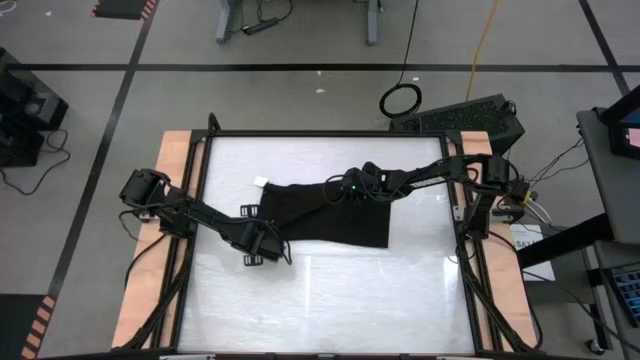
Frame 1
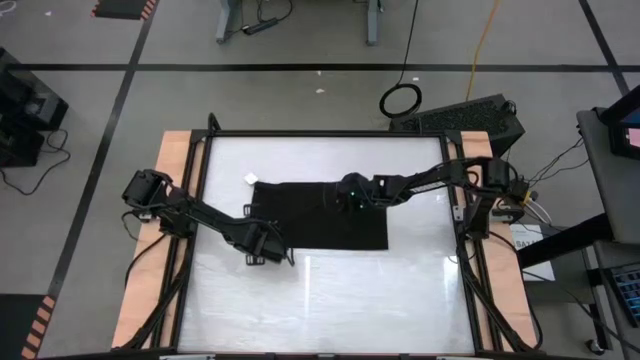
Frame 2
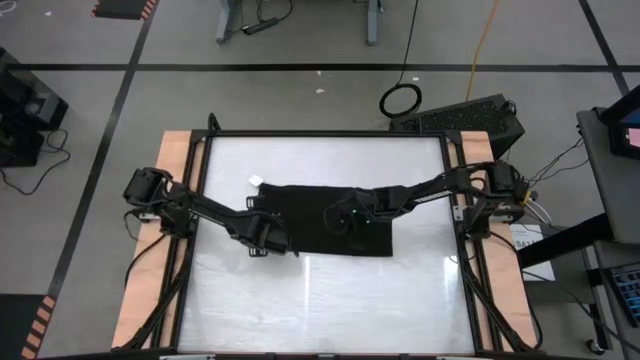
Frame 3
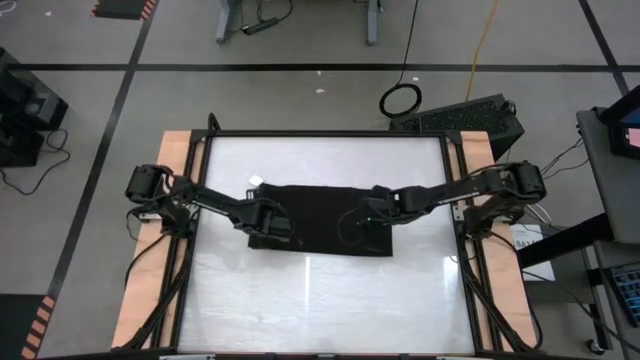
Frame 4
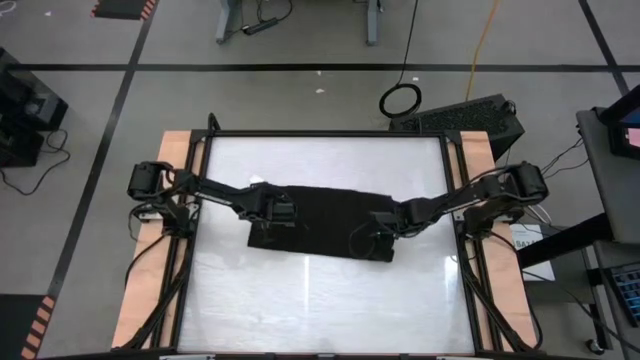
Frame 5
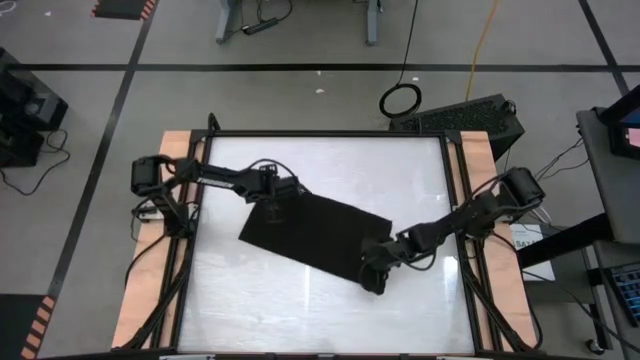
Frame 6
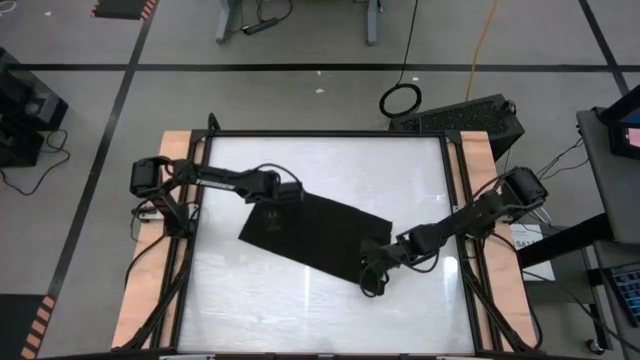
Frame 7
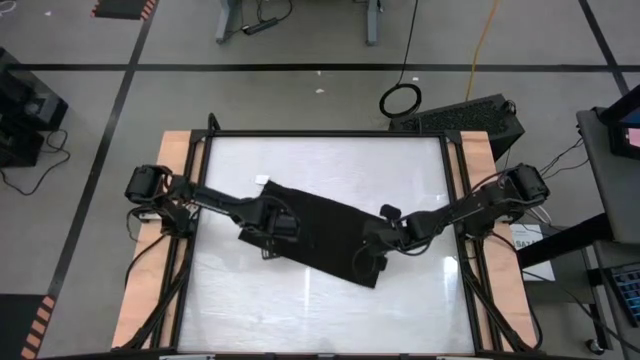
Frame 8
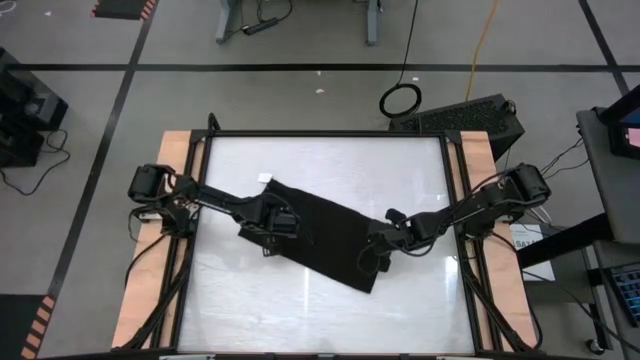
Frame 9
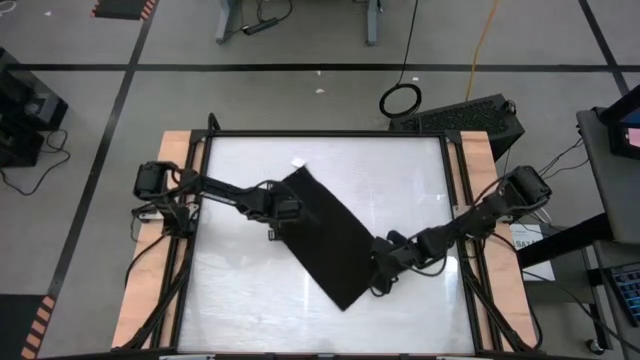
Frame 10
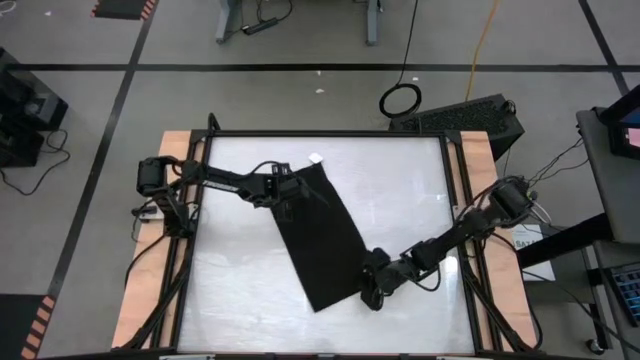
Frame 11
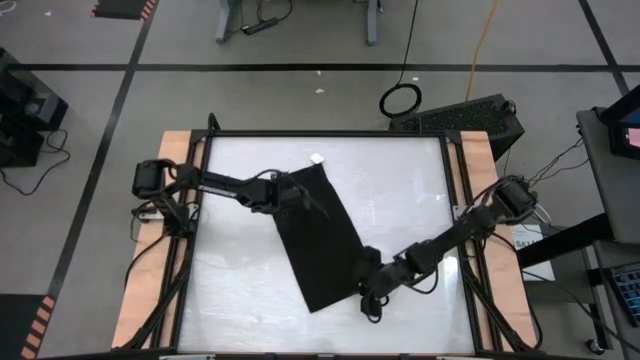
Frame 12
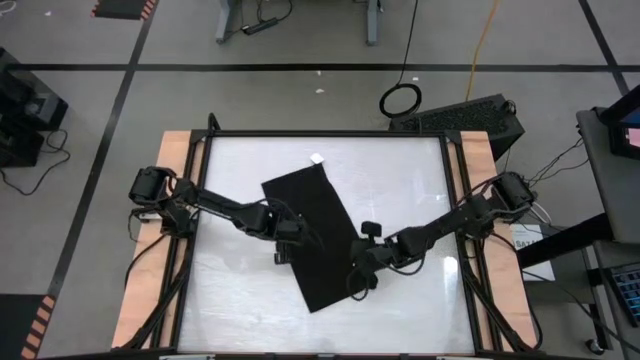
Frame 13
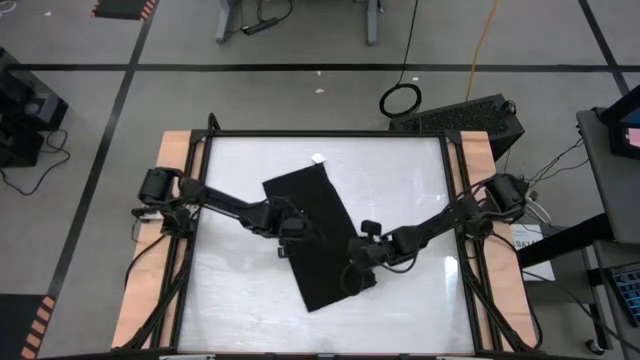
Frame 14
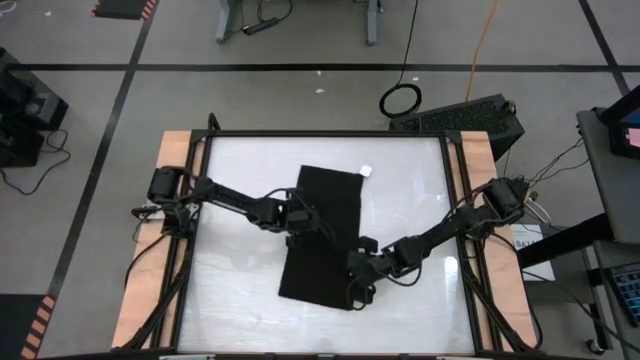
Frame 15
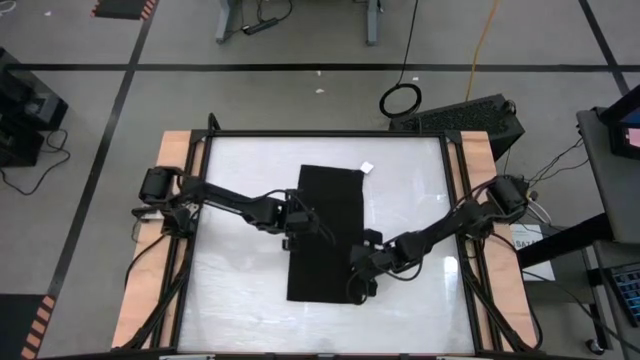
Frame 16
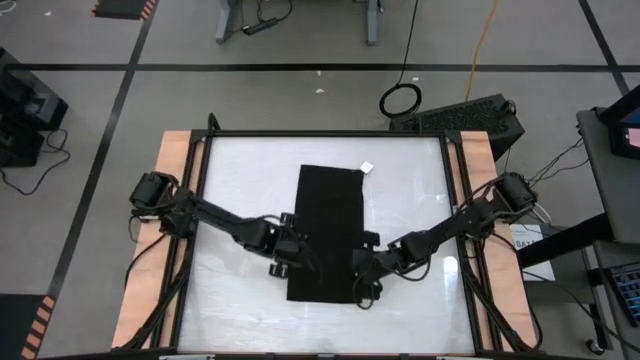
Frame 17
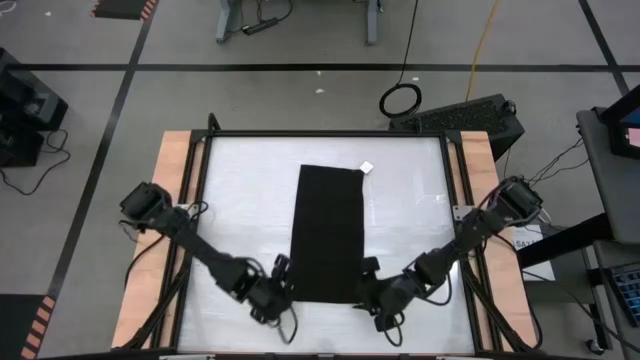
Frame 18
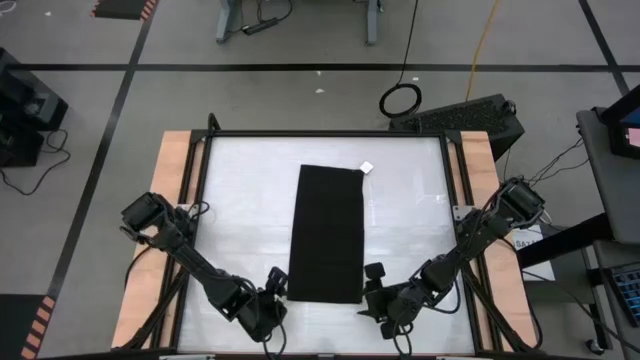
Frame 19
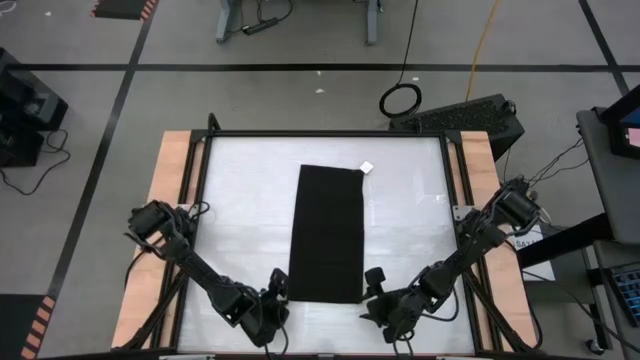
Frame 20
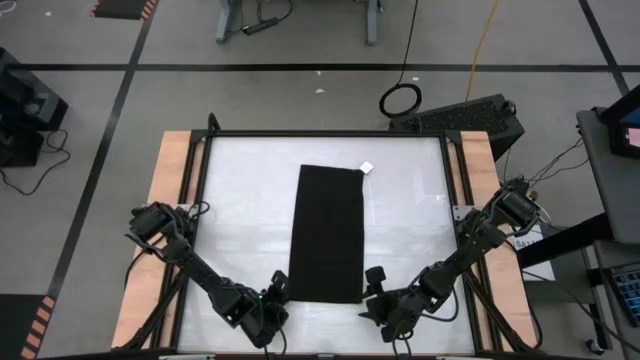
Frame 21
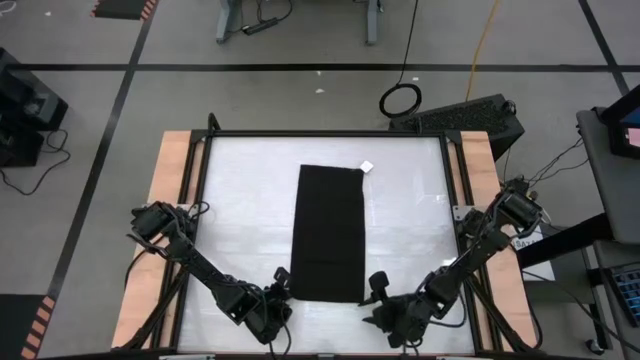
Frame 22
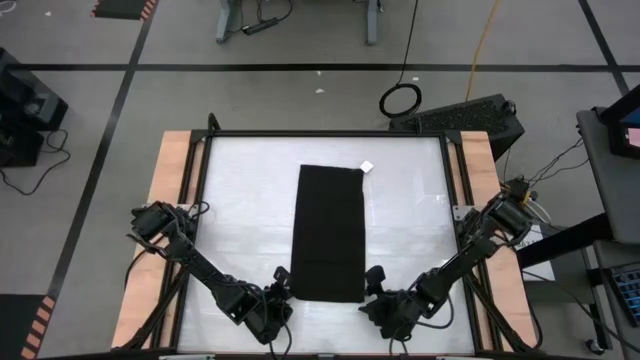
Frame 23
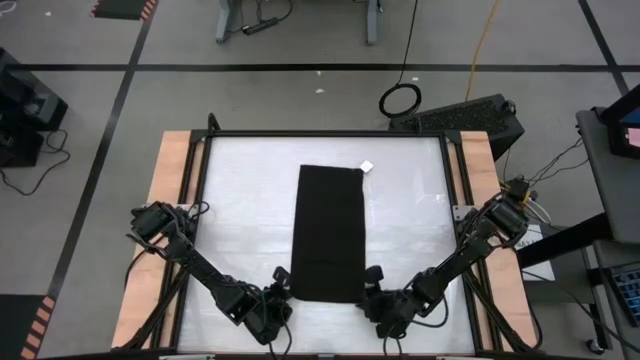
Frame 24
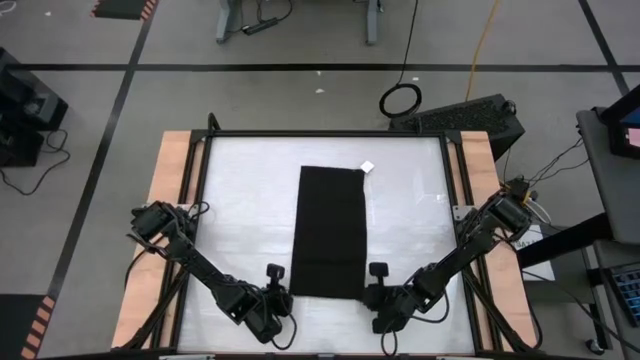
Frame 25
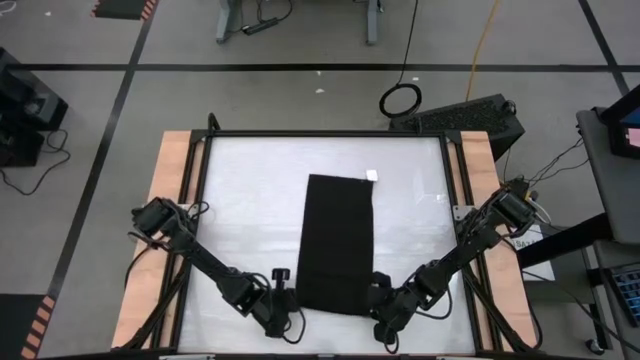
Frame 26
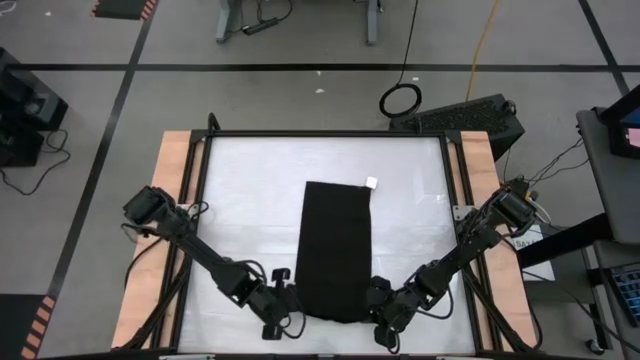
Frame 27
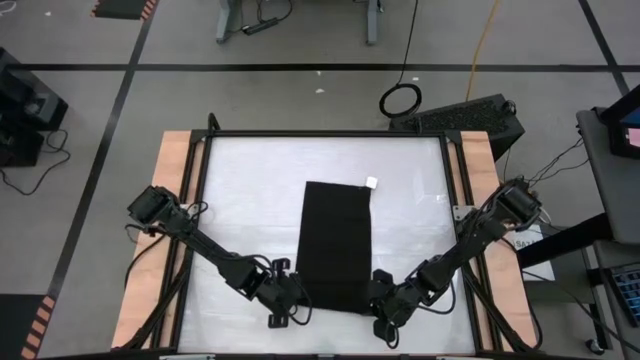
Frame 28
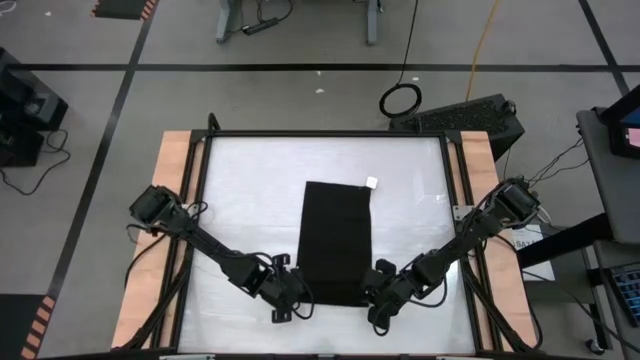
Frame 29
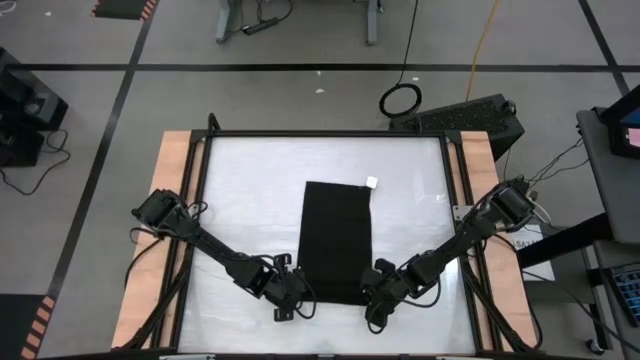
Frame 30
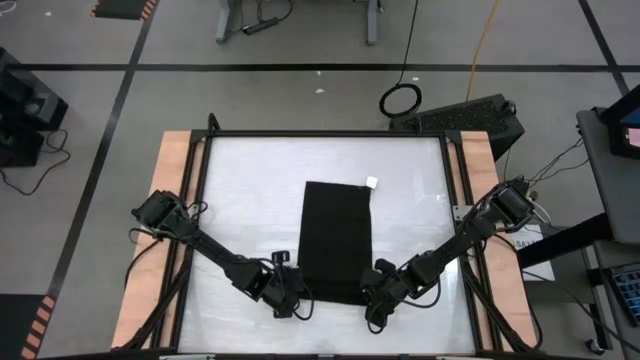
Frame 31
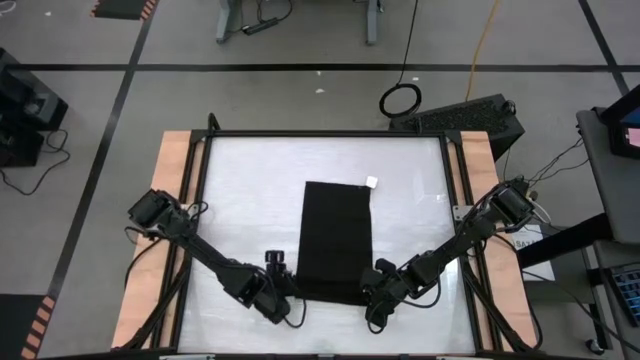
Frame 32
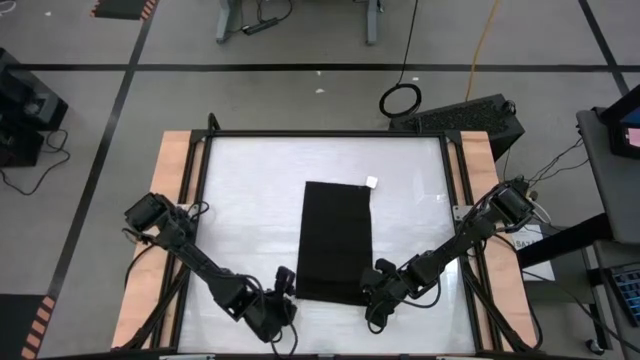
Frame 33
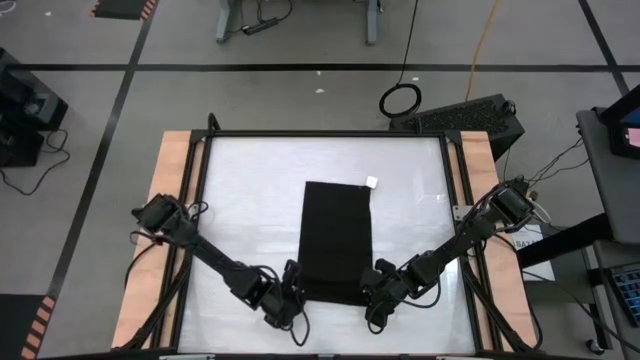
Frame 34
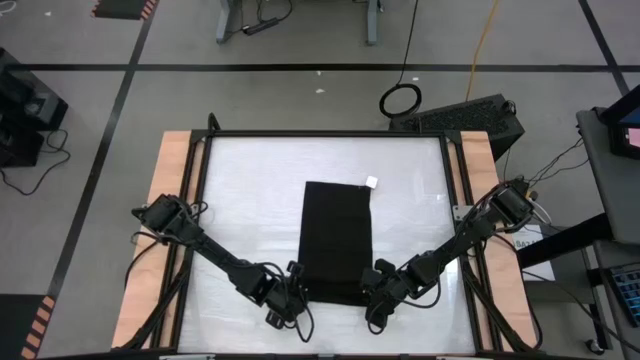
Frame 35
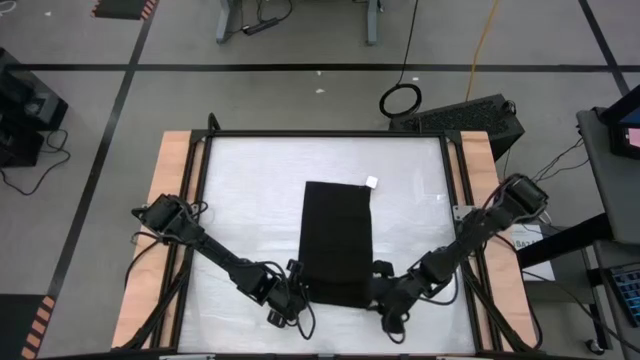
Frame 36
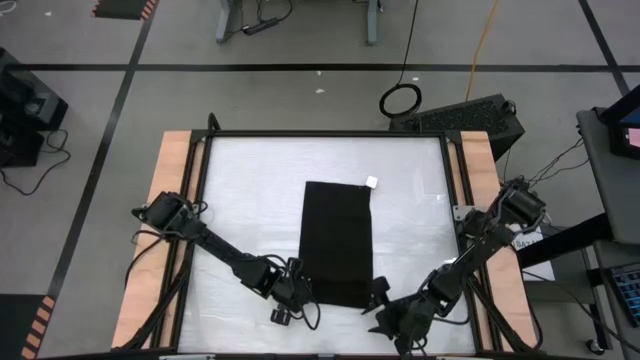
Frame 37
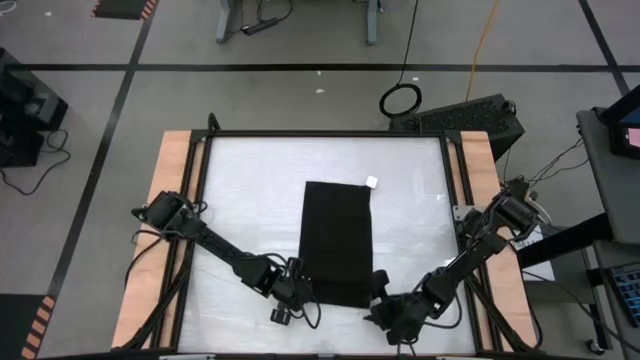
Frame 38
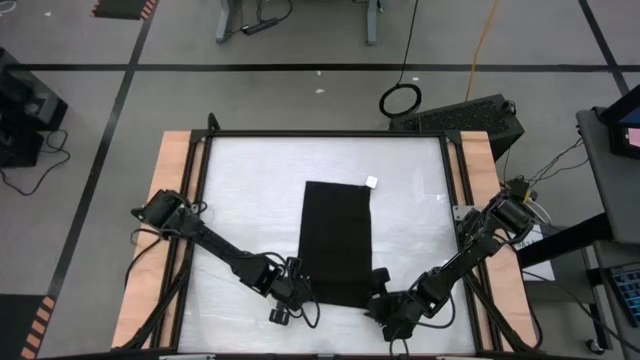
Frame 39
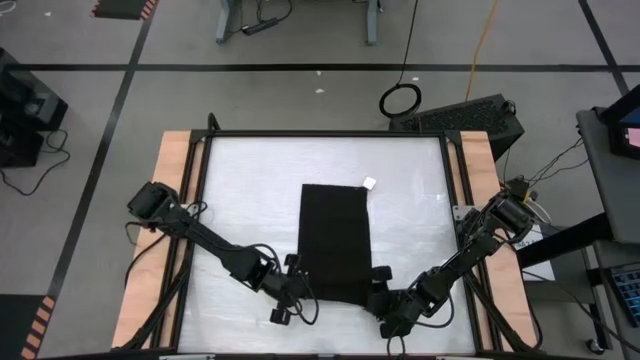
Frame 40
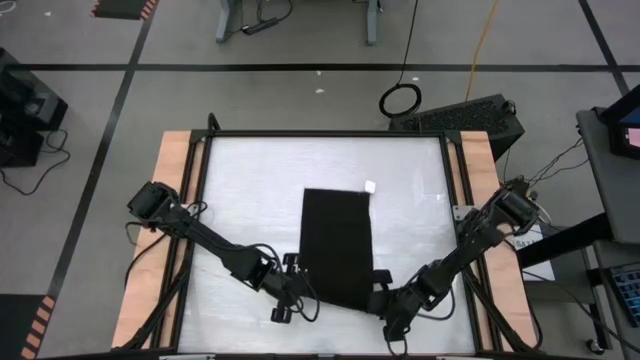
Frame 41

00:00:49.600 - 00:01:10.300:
Task: Roll towel
Roll the black towel
